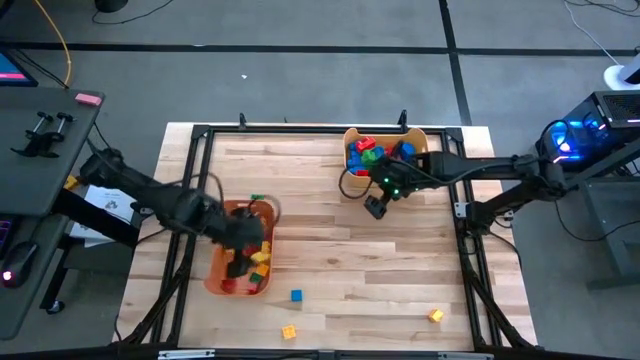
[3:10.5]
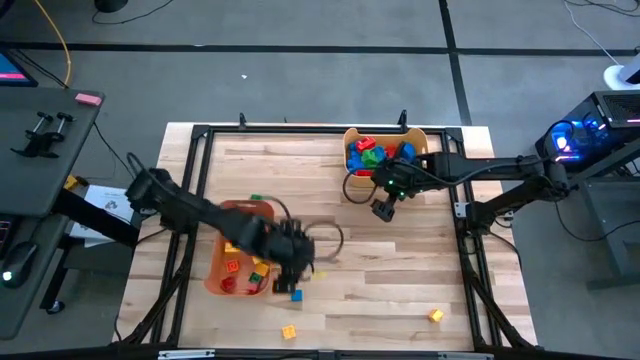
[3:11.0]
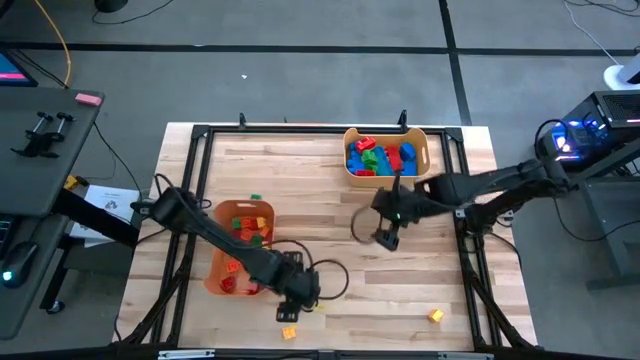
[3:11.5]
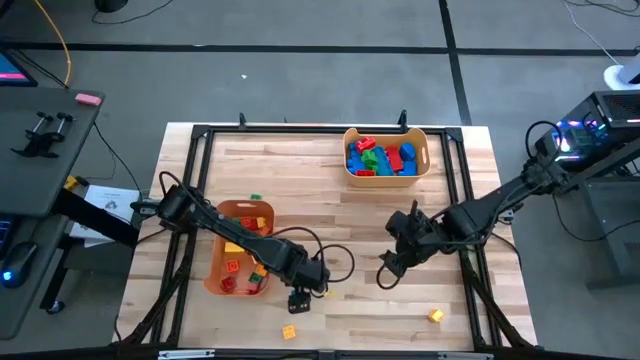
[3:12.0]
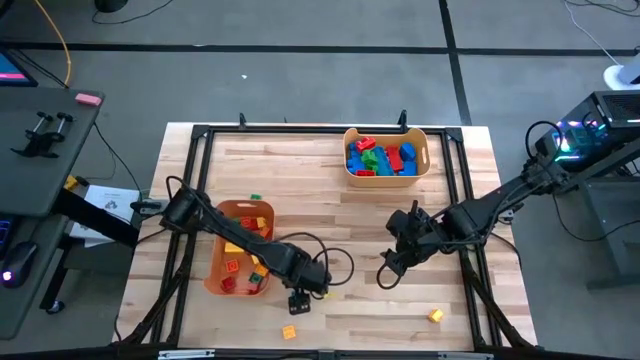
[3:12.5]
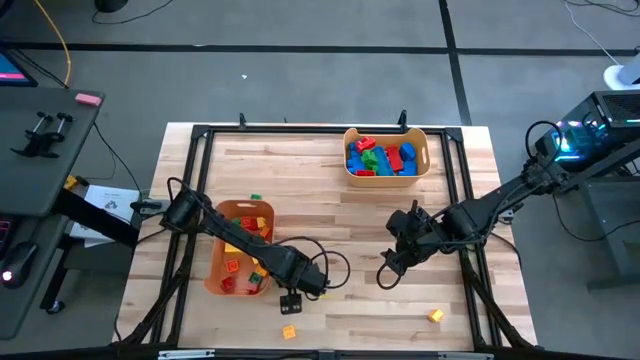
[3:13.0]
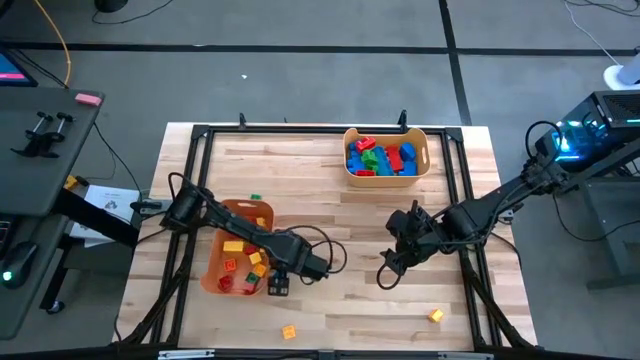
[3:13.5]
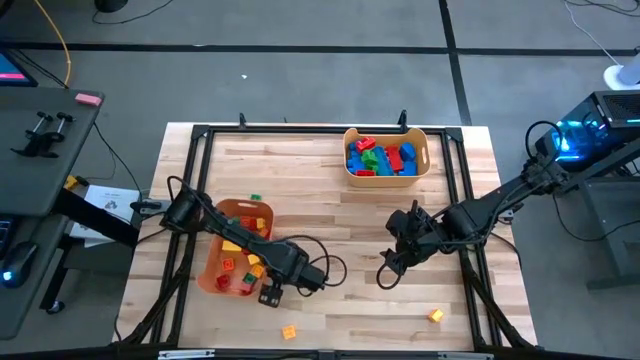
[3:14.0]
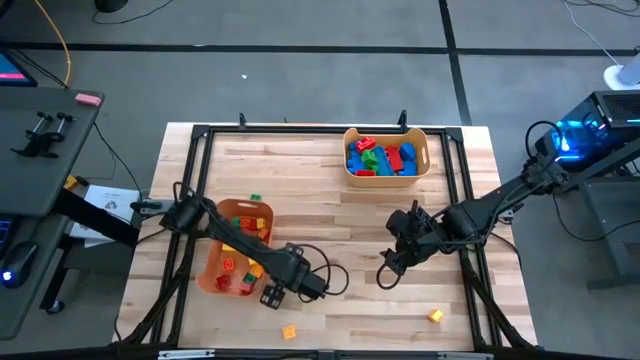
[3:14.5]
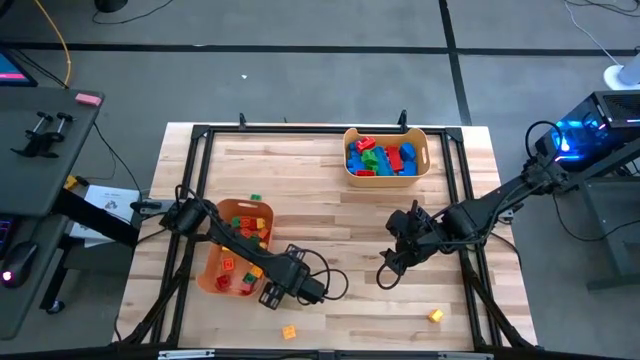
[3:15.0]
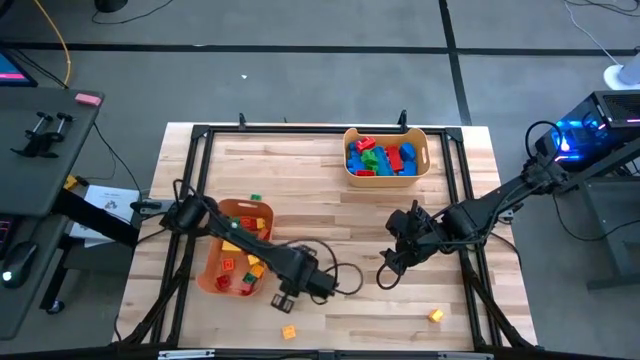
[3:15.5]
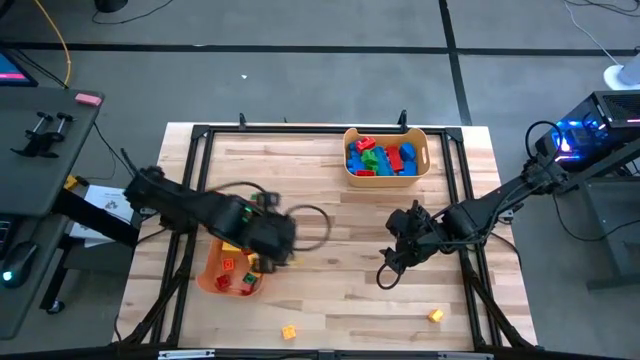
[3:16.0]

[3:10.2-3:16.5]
Task: Sort blocks by size
Put the blue block into the orange bin

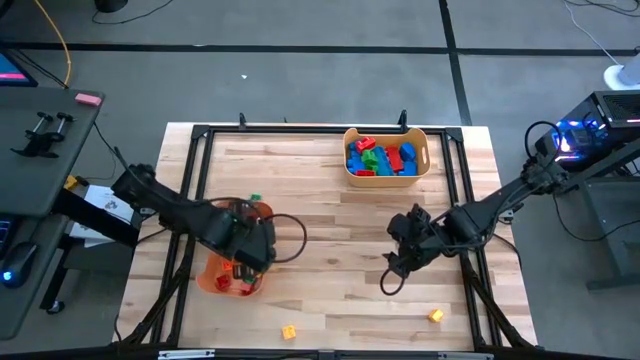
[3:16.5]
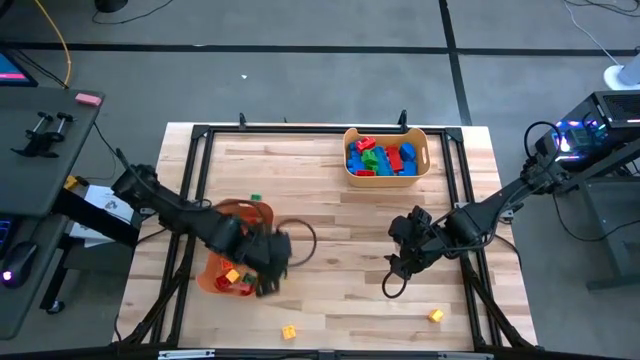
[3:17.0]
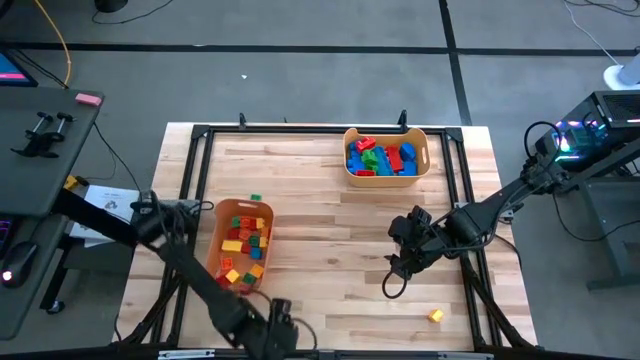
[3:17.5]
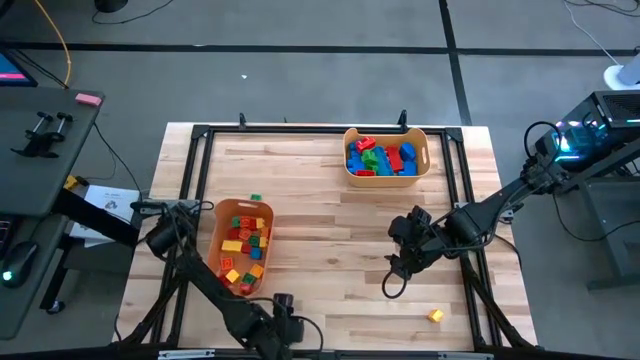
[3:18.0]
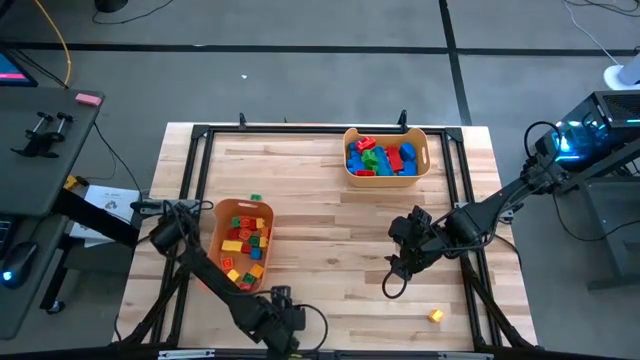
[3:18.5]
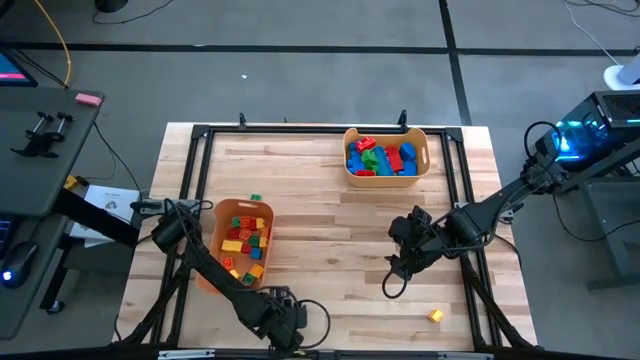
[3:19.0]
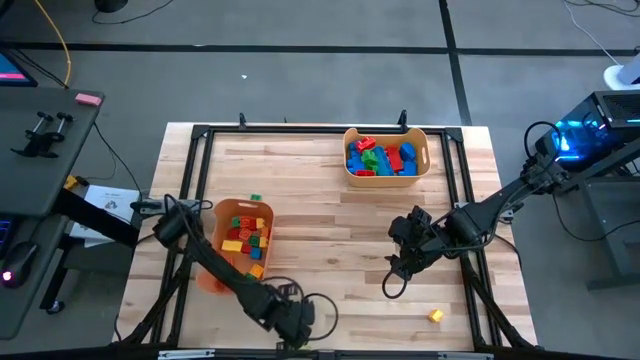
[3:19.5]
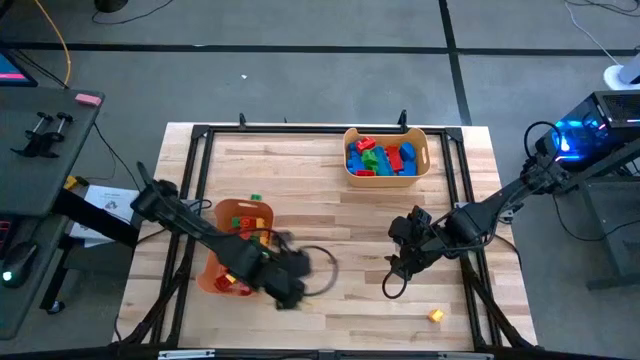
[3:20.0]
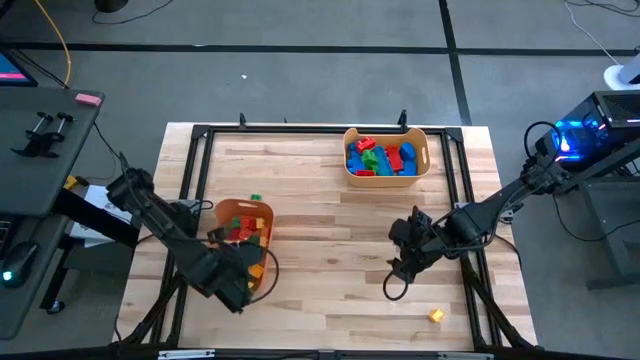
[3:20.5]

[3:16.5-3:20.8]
Put the yellow game piece into the orange bin

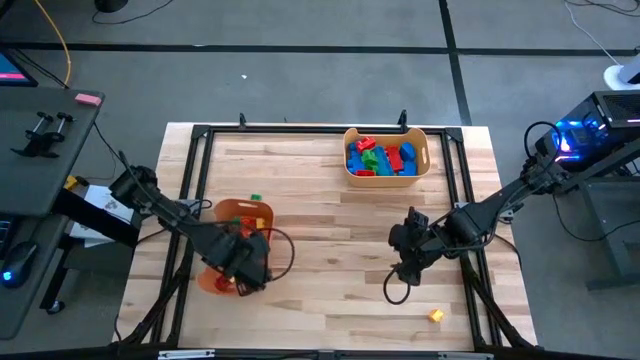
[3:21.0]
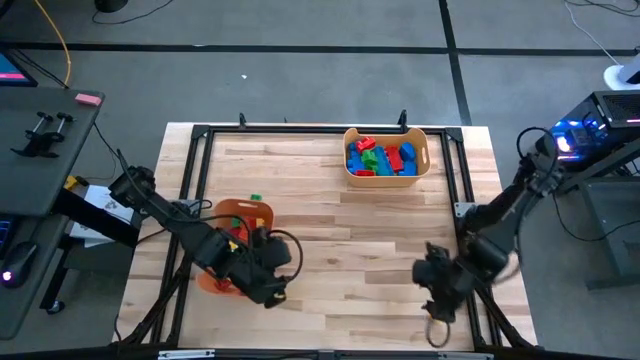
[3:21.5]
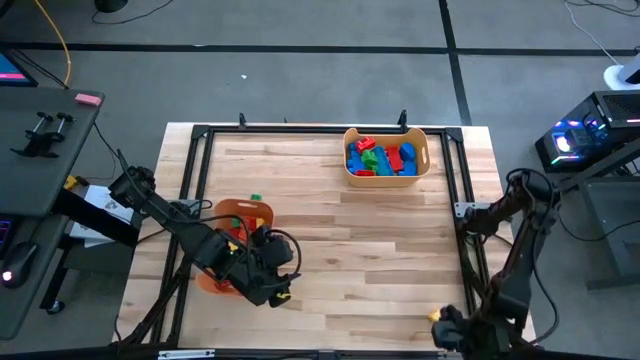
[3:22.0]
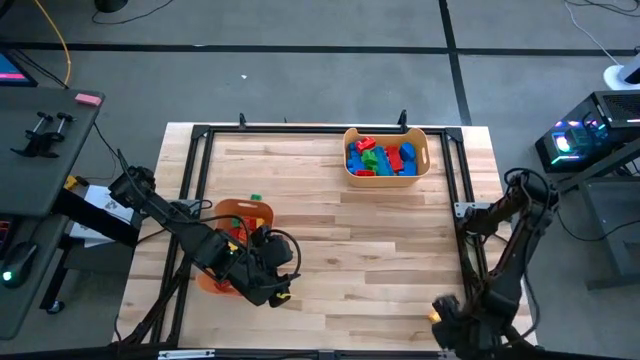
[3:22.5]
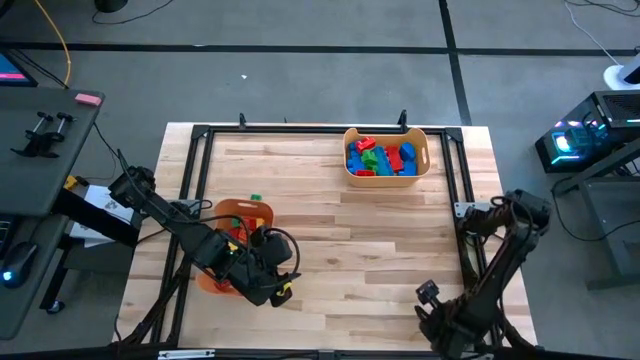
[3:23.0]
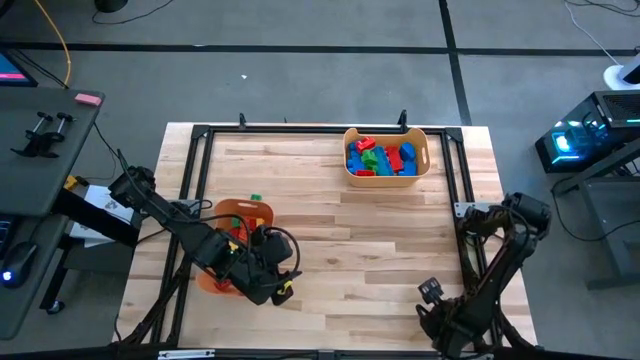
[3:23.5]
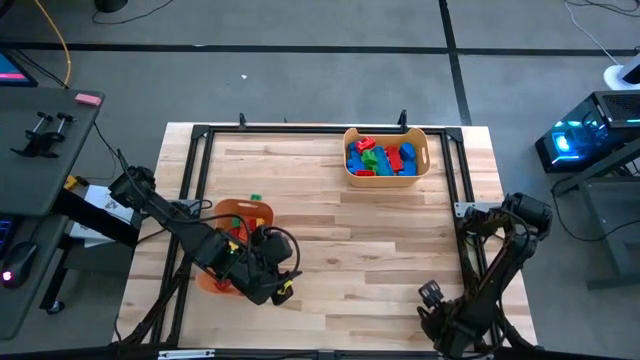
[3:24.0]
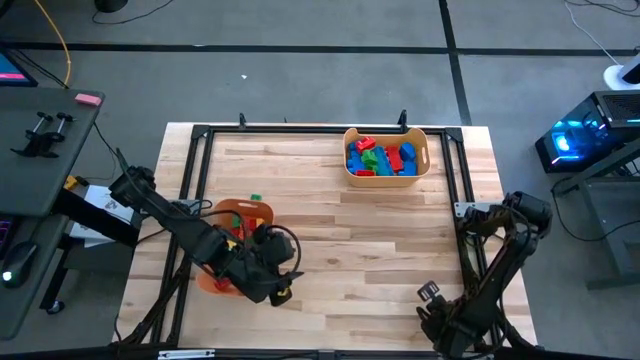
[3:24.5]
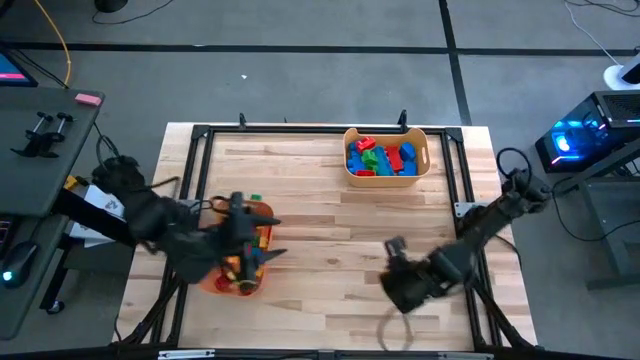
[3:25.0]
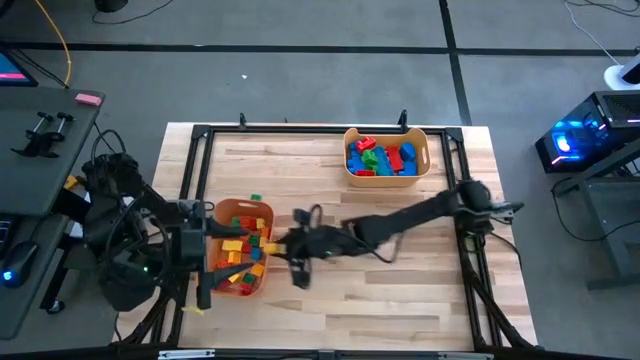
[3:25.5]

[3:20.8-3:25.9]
Put the yellow game piece into the orange bin

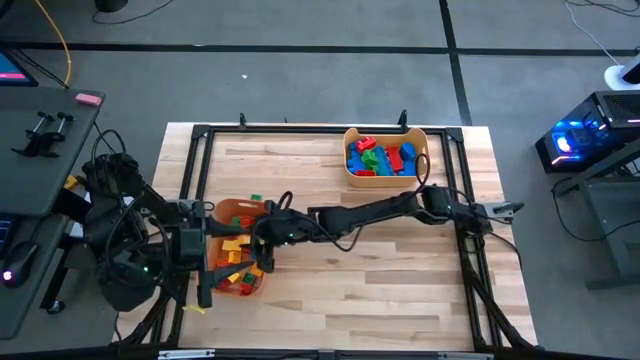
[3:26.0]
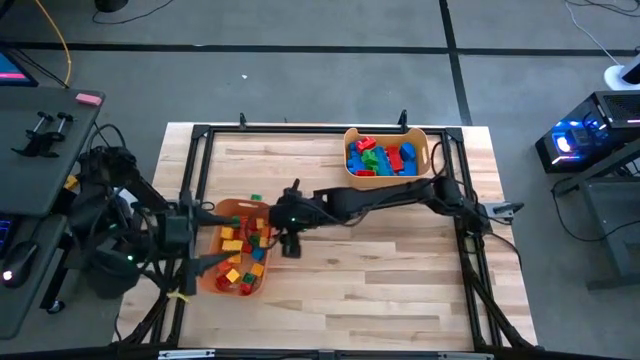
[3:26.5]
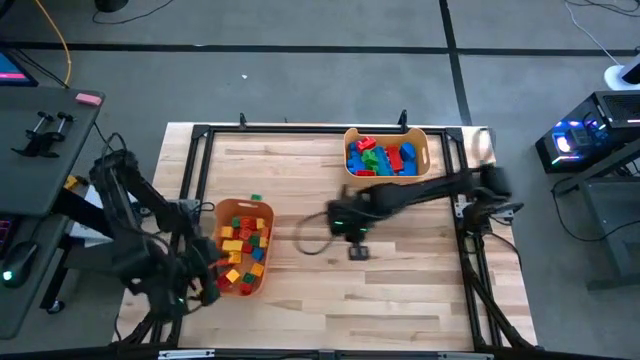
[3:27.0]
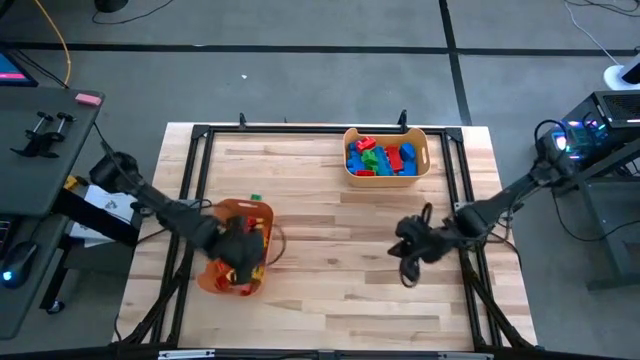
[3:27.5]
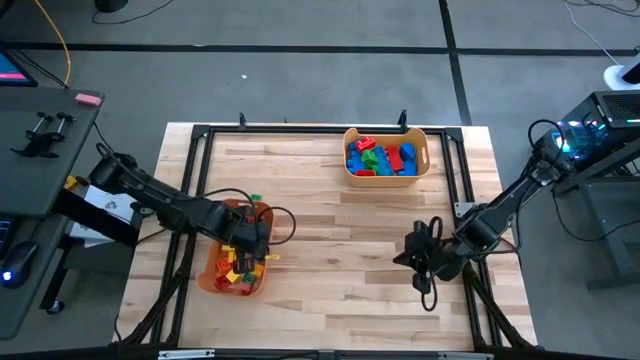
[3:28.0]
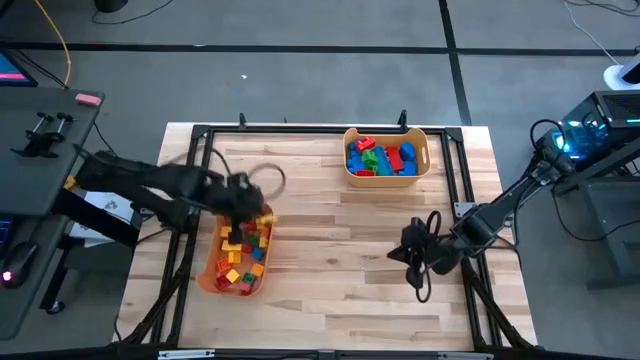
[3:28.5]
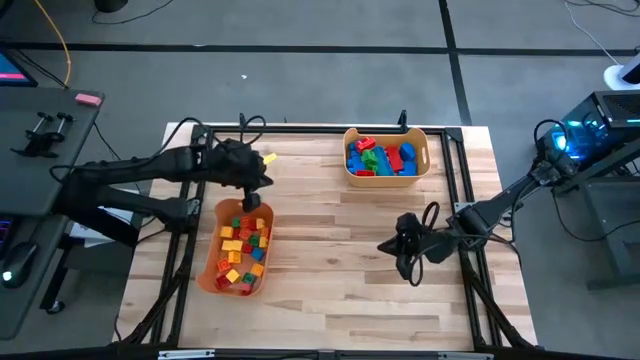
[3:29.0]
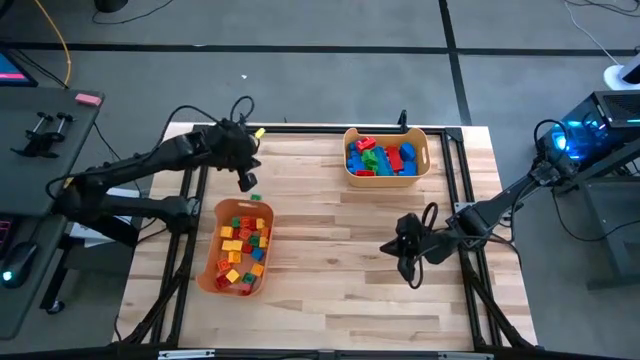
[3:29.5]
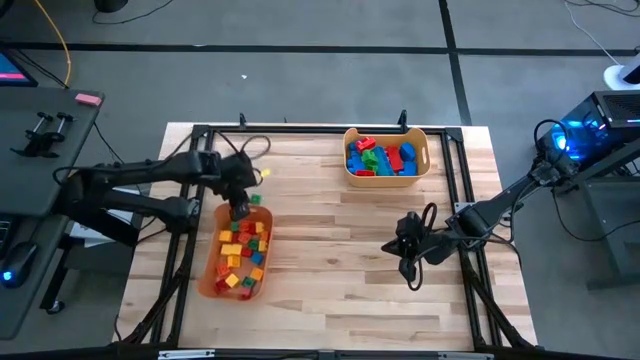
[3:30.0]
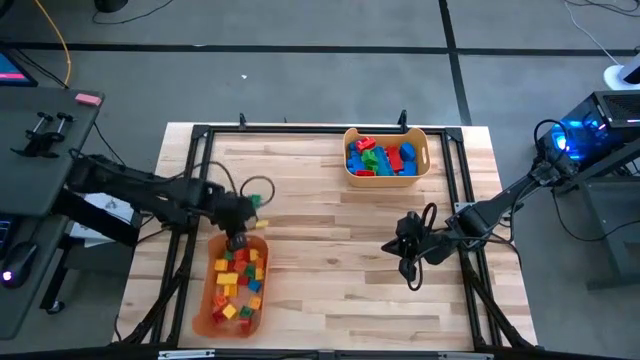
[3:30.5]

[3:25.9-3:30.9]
Adjust the orange bin

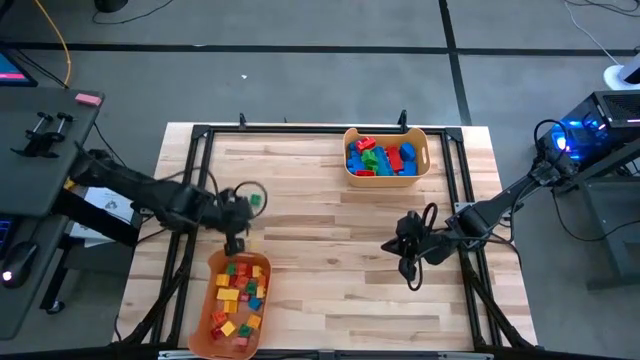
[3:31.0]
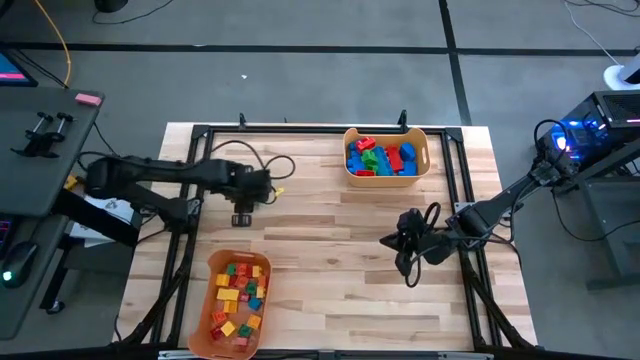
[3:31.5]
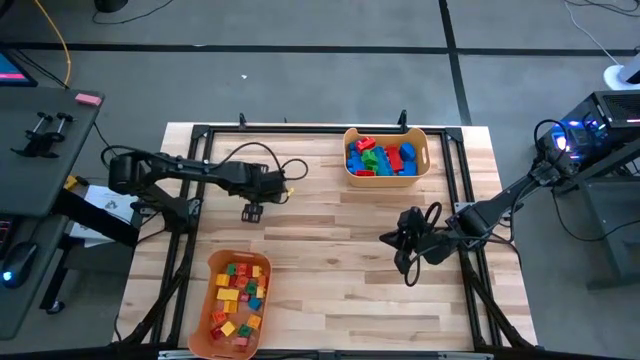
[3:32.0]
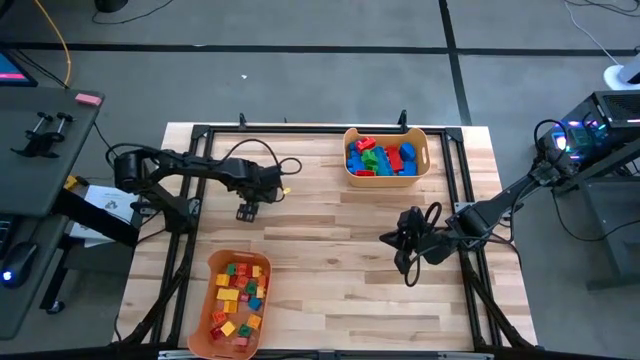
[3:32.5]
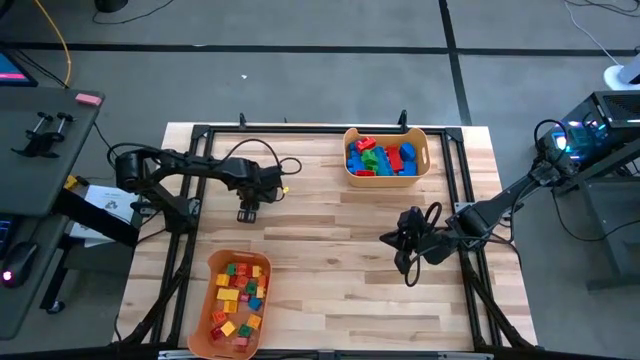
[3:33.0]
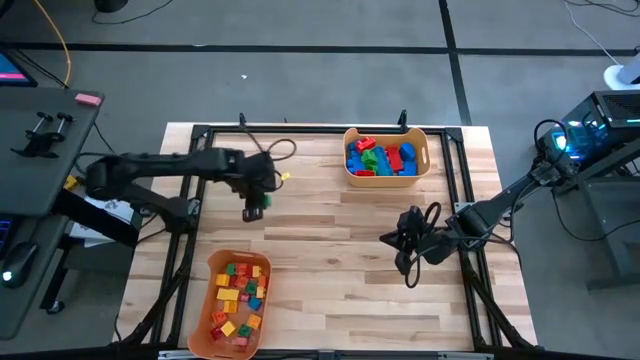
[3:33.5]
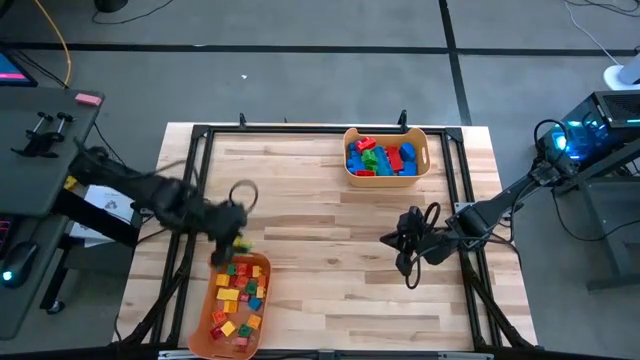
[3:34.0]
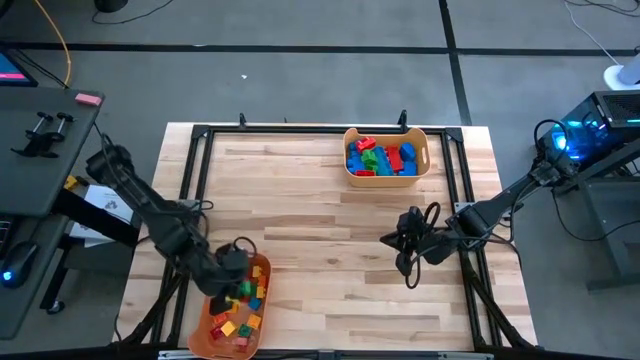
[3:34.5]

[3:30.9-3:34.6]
Put the green game piece into the orange bin
